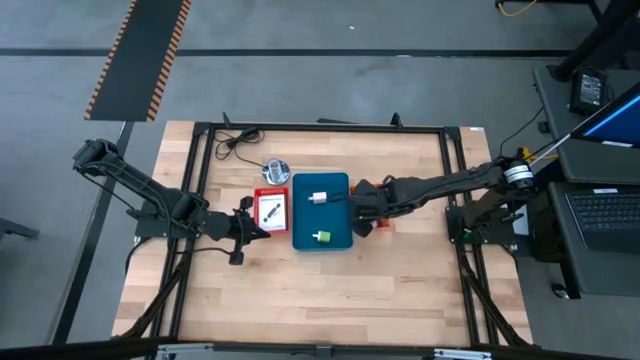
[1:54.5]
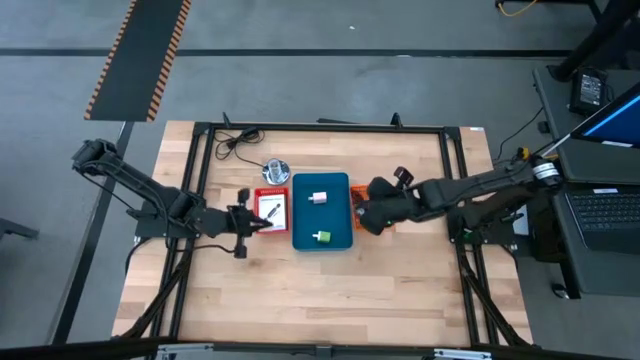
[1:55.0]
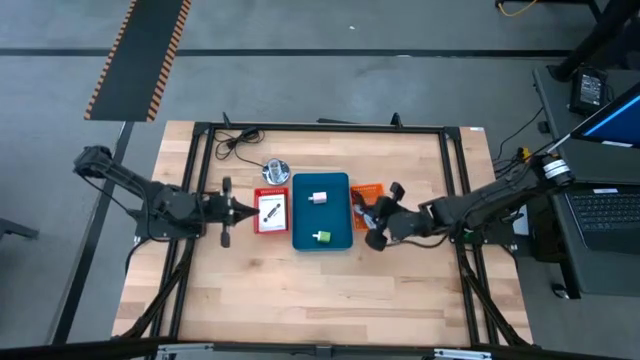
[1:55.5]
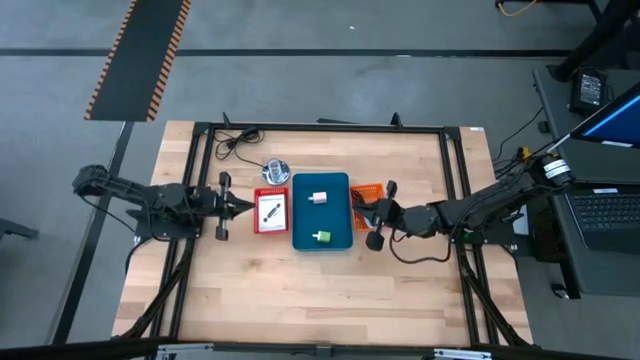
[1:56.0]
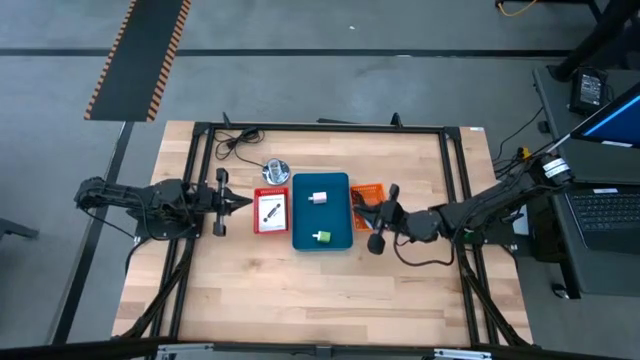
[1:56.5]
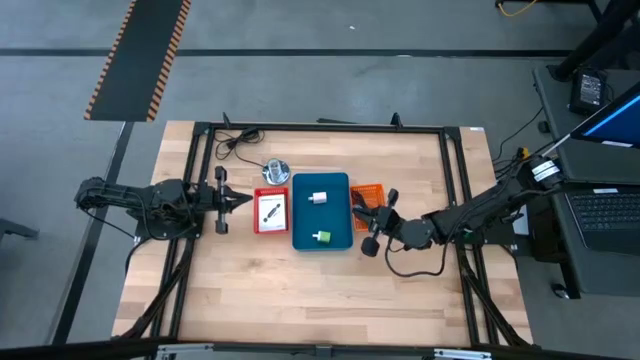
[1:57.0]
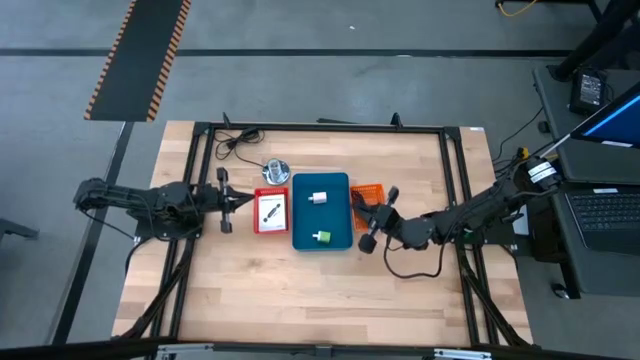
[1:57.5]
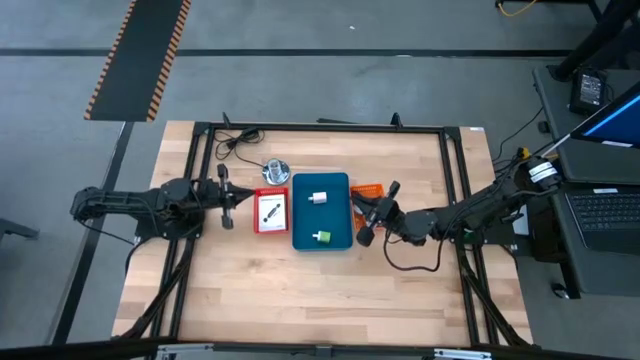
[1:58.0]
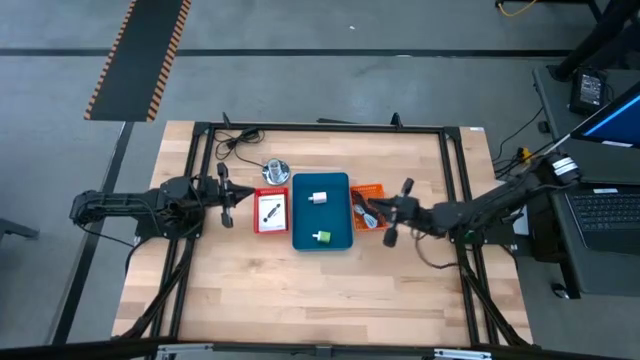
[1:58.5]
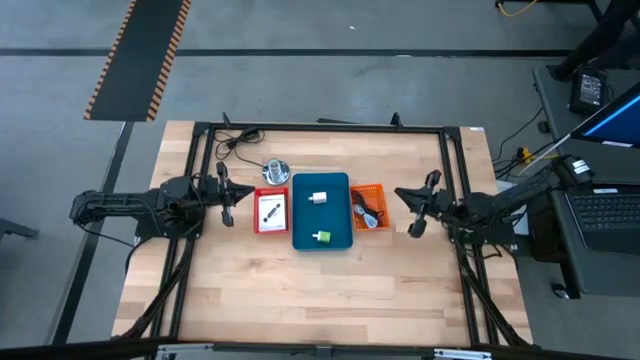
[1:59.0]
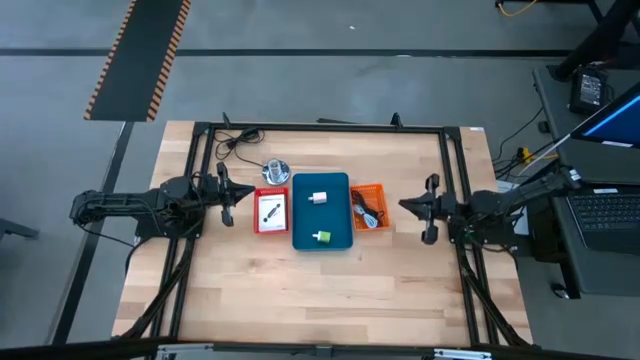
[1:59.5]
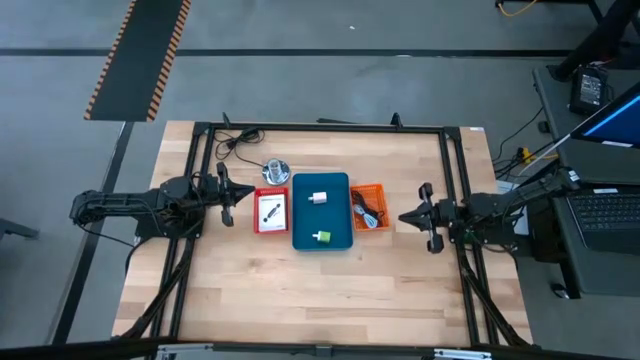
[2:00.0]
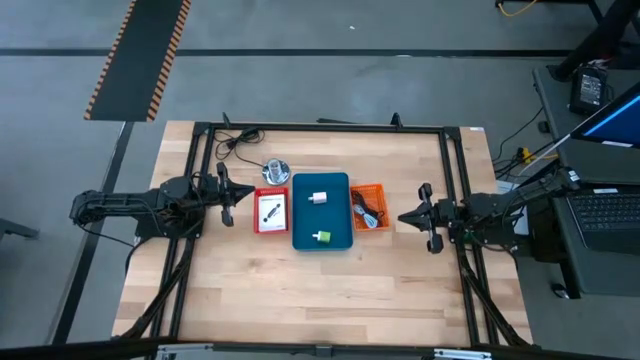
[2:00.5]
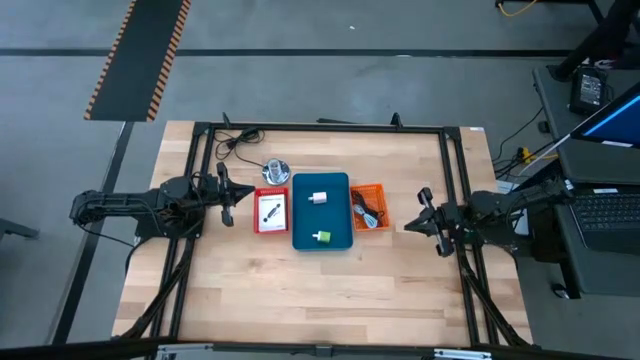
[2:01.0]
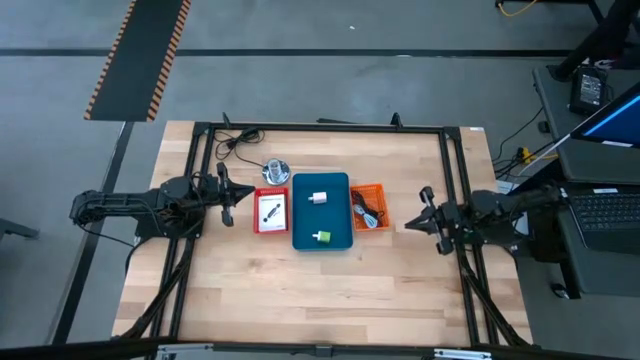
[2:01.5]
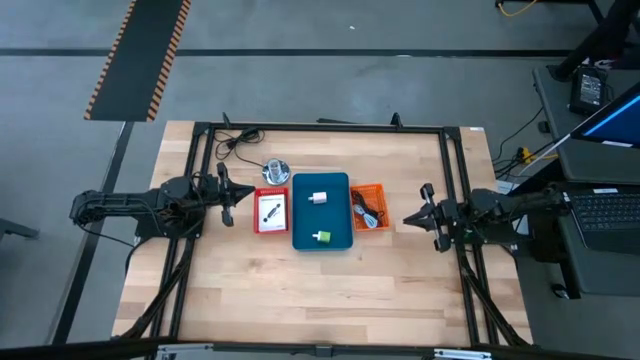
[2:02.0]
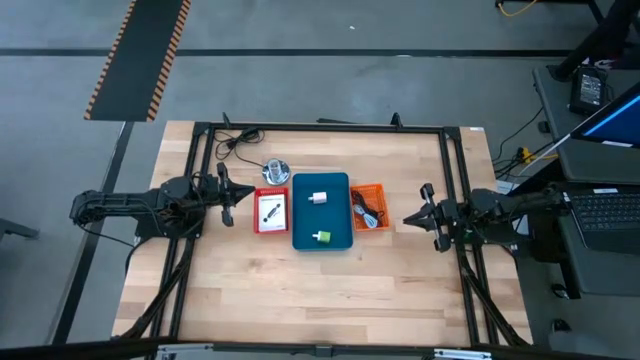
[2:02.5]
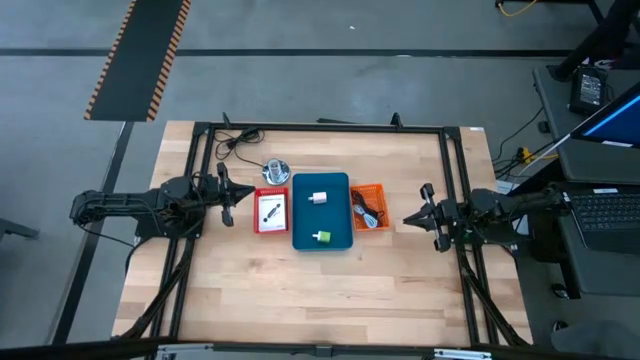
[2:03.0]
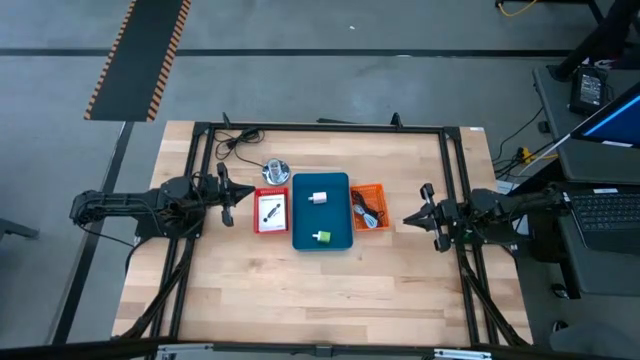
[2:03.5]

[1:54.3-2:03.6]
Task: Pick and place items into bin
Return to Home Position

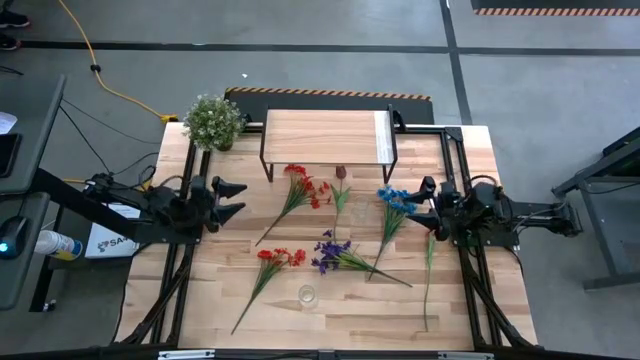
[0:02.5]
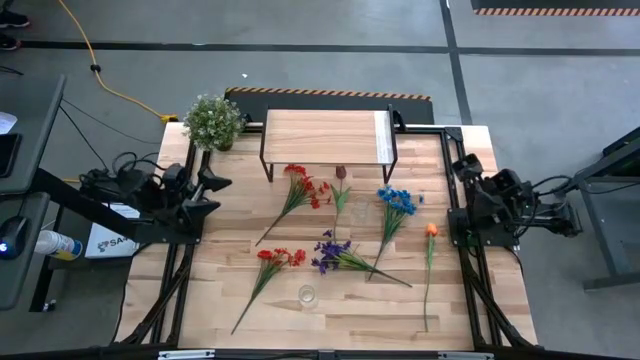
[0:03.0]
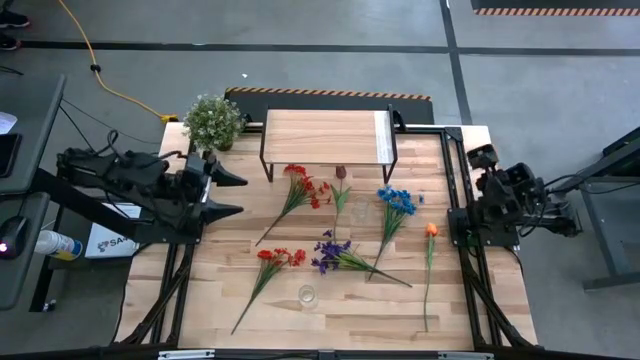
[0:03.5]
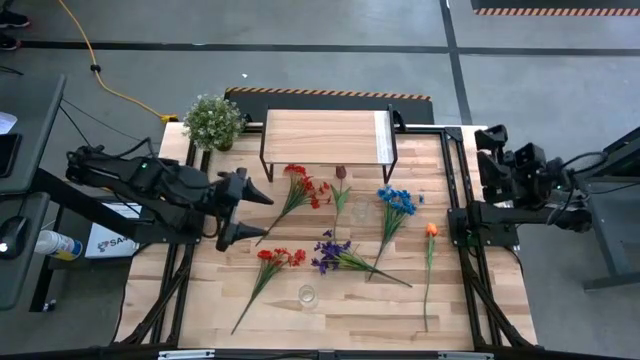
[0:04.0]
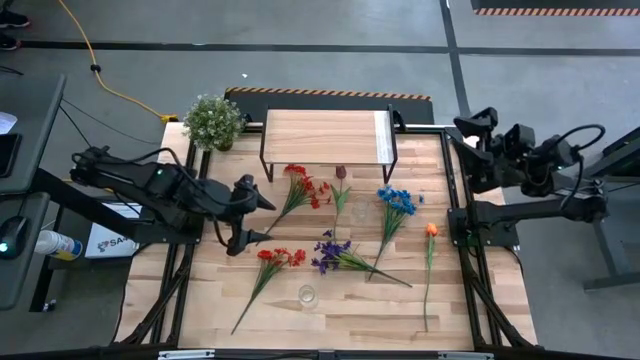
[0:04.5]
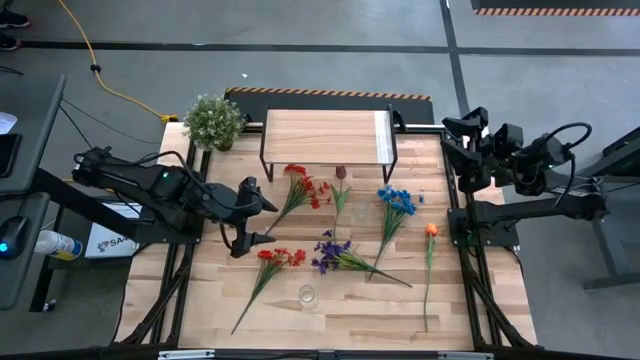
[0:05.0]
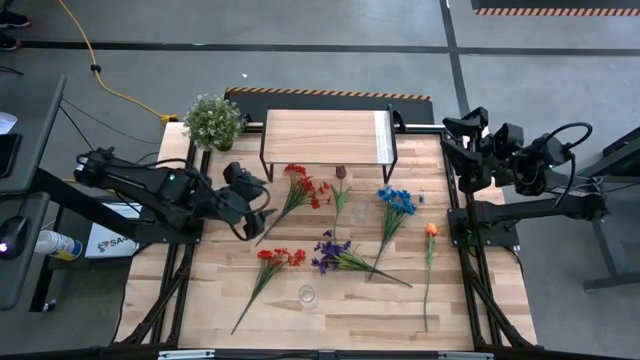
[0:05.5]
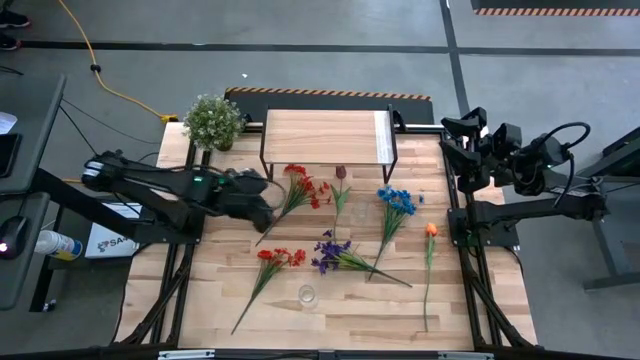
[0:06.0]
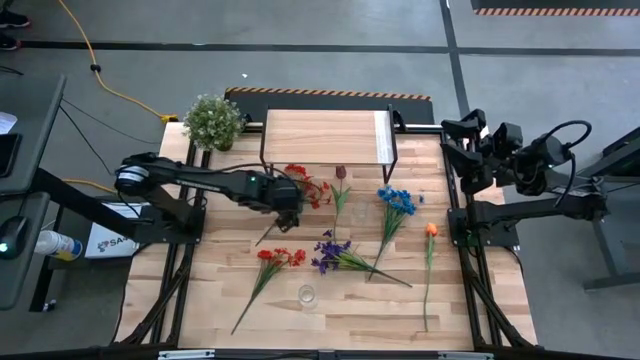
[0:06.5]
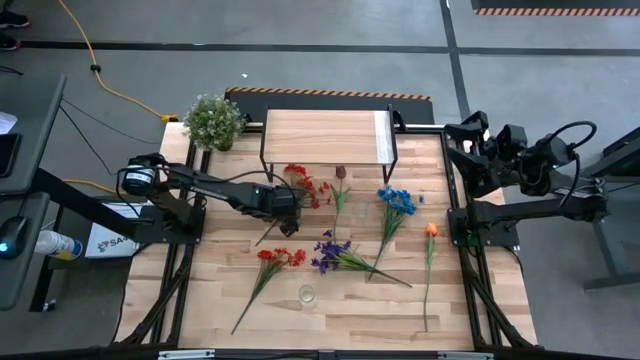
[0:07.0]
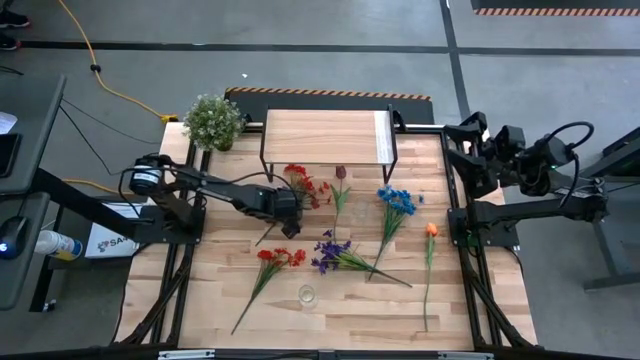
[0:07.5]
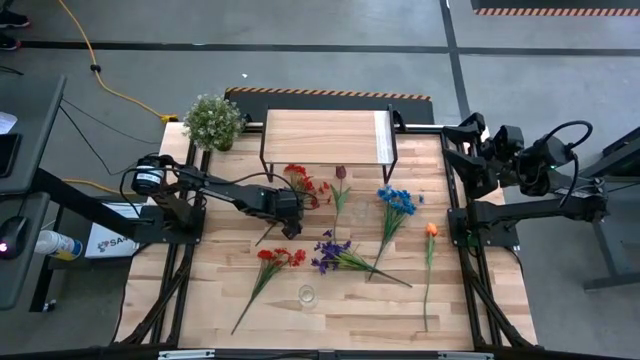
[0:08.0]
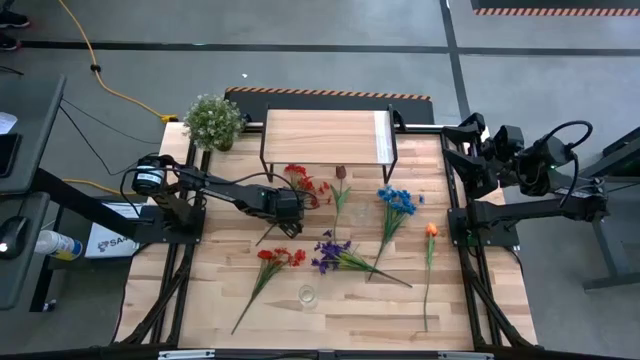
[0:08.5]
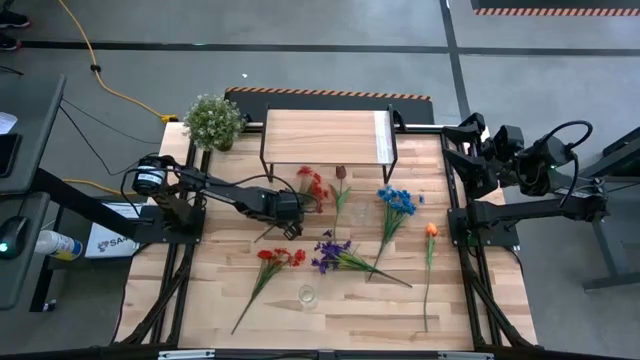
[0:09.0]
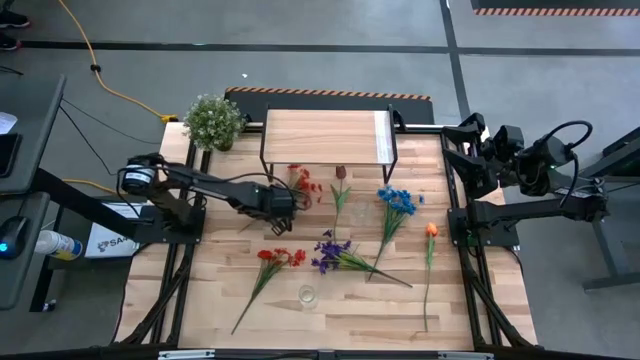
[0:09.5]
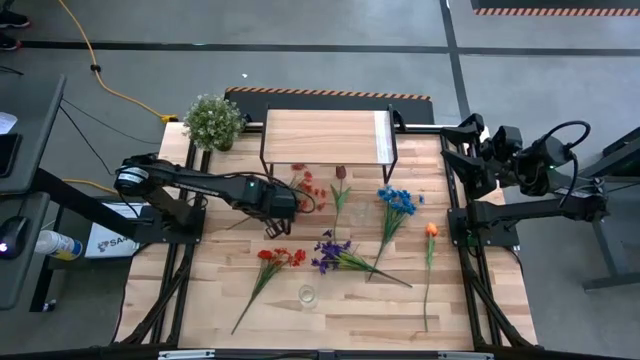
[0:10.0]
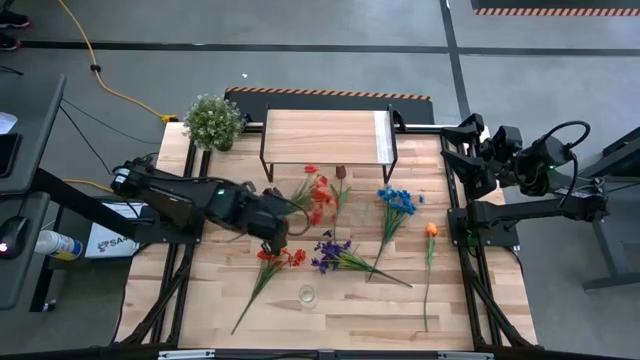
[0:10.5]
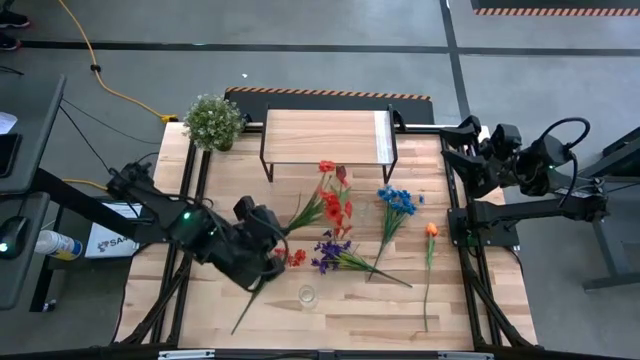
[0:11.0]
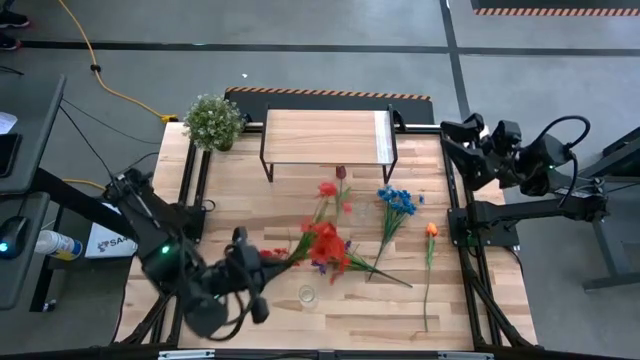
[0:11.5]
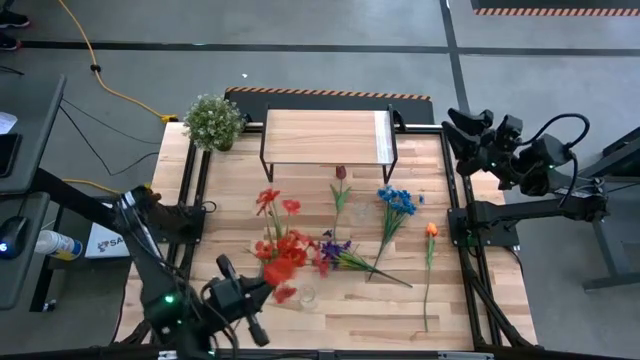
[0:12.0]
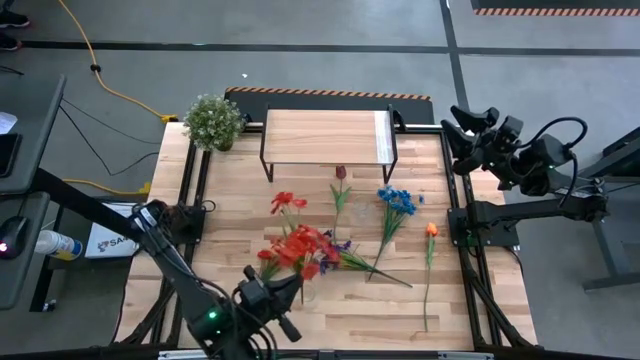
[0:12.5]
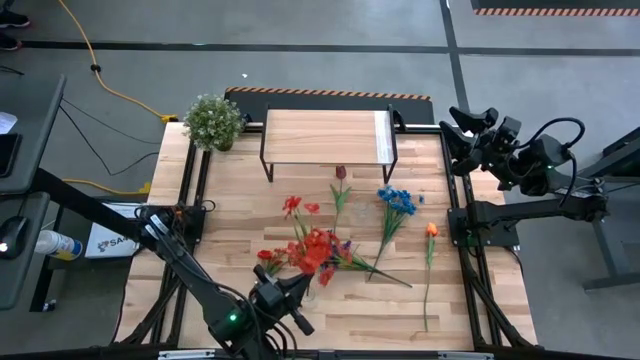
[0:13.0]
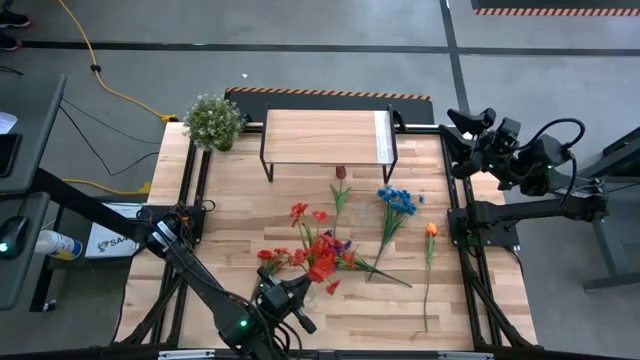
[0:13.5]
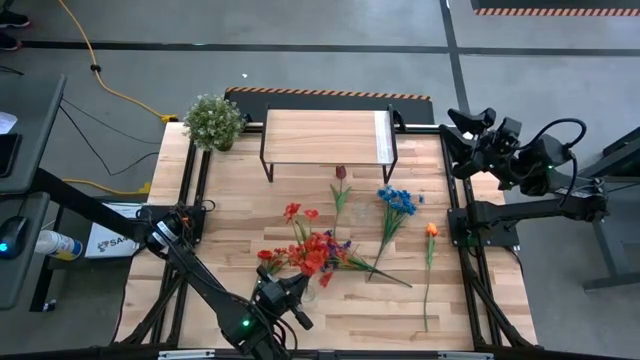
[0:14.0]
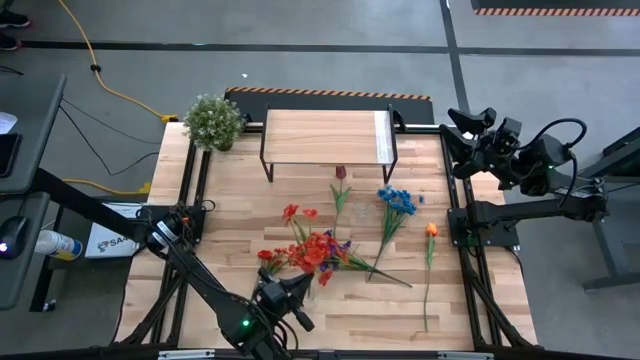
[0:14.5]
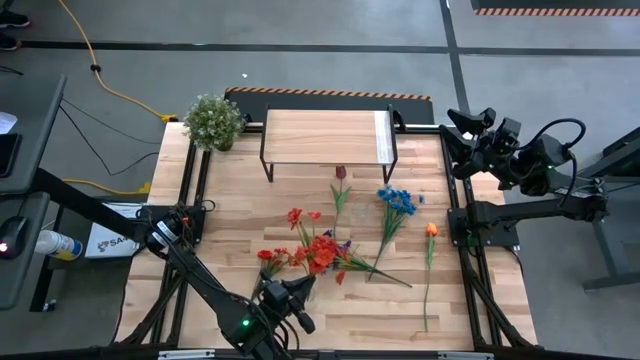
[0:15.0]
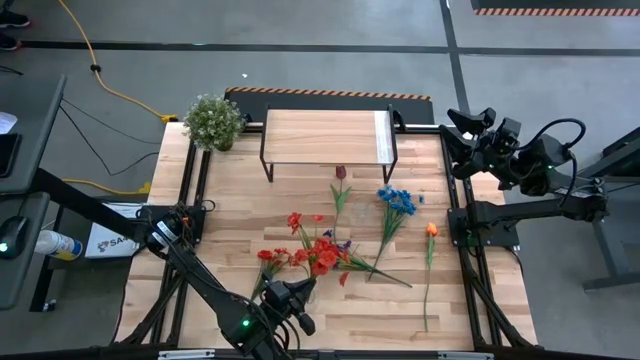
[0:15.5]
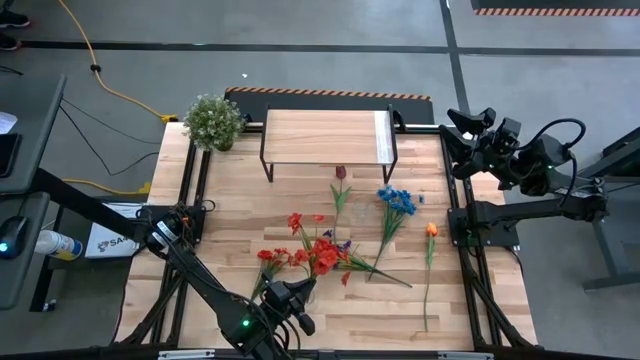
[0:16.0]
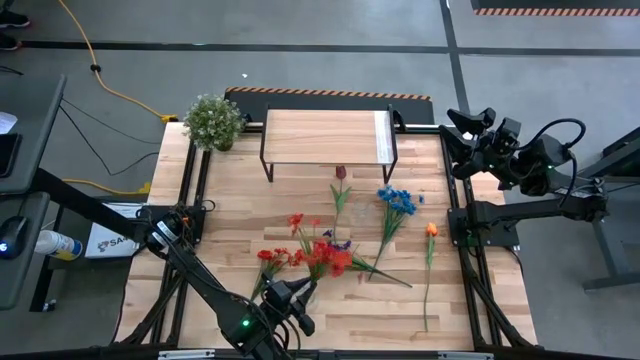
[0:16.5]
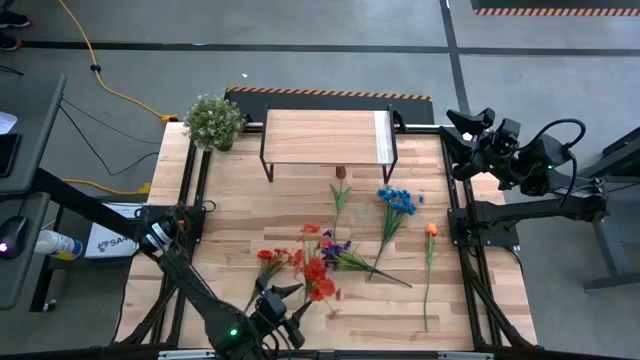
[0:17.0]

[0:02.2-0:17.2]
Task: Pick and place flowers into a vace then onto a shelf
Put the top orange flowers into the bottom transparent vase
